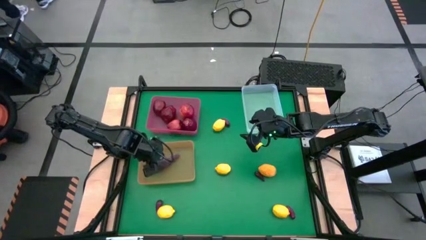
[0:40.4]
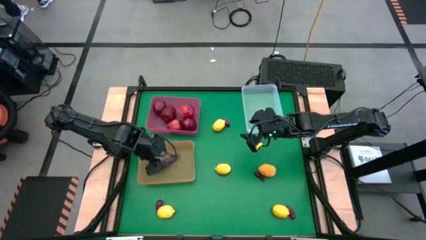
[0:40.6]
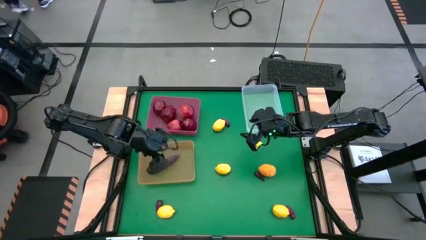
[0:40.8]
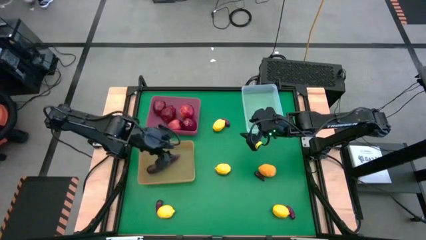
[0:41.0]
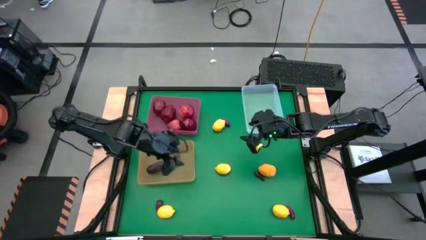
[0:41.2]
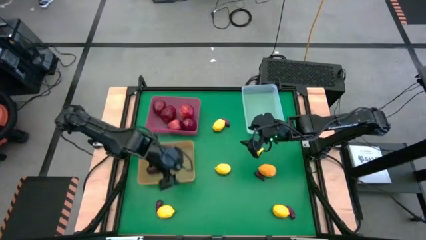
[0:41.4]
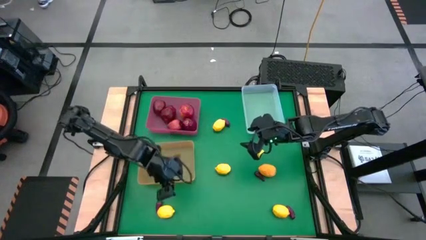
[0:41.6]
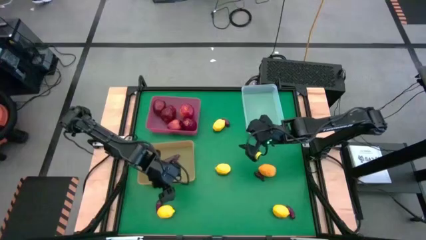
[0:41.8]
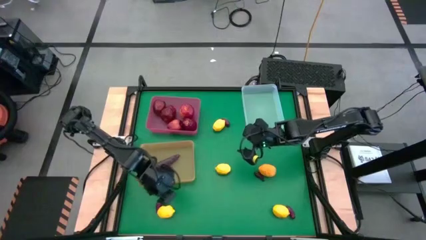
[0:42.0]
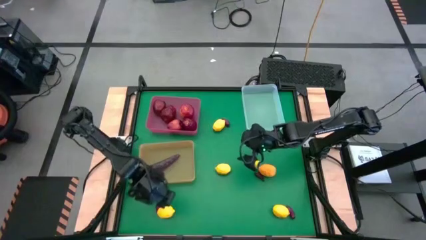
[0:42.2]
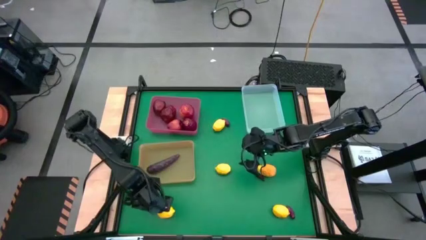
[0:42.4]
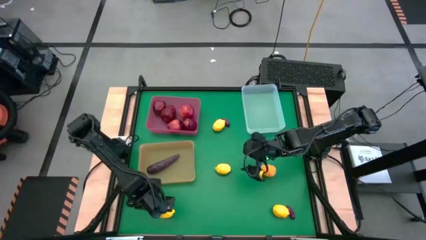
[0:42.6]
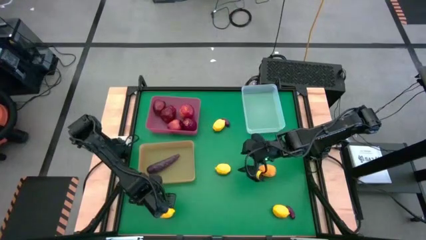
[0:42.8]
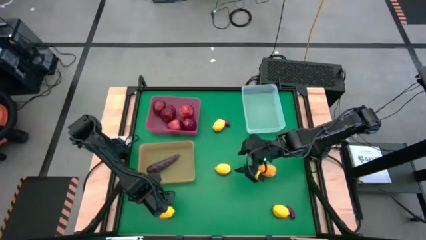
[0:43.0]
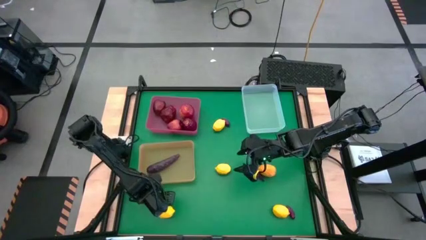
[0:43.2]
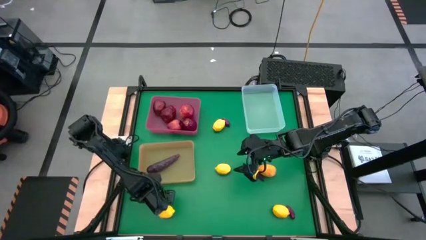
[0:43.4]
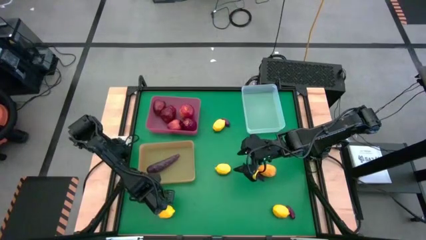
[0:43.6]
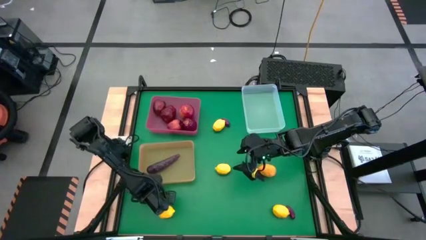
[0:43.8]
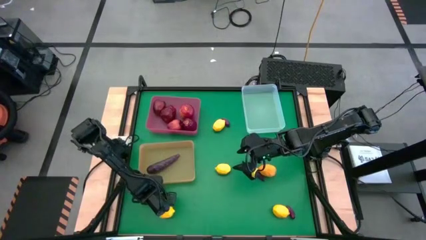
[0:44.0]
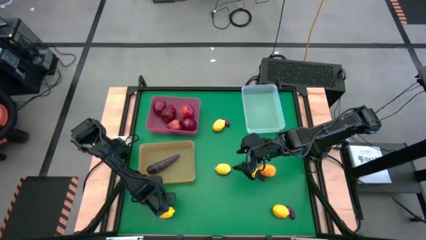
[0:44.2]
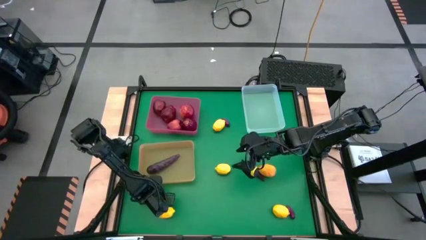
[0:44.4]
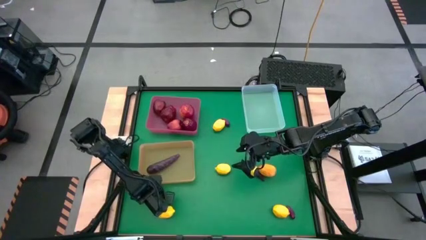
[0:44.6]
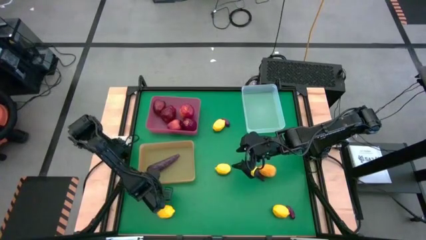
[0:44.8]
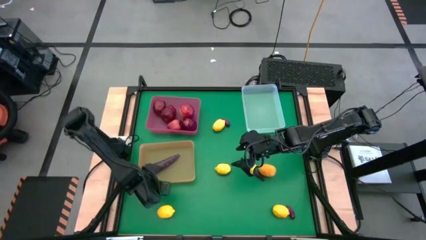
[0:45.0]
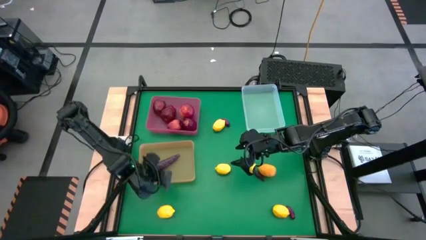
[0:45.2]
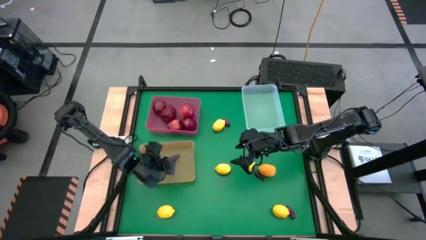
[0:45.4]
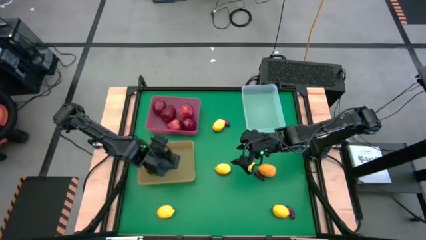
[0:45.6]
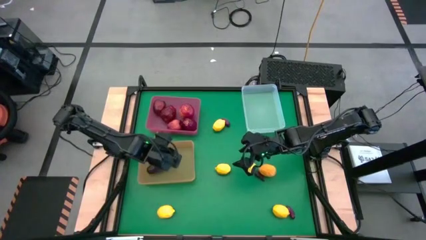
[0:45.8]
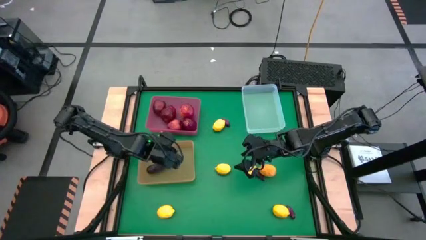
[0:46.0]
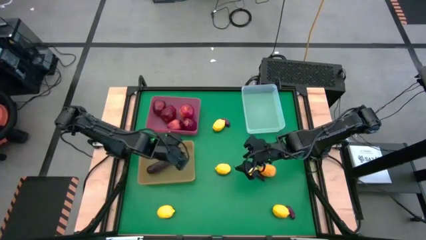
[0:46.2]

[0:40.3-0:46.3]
Task: Sort produce into baskets
Put the eggplant into the orange bin

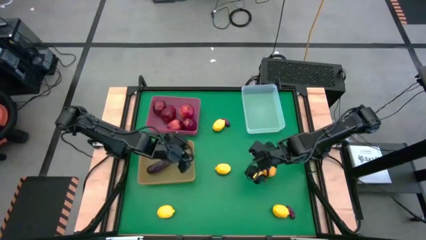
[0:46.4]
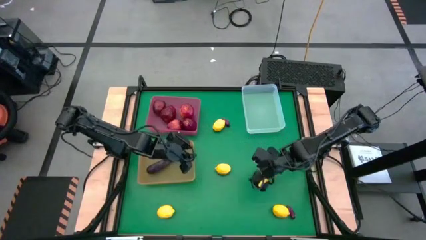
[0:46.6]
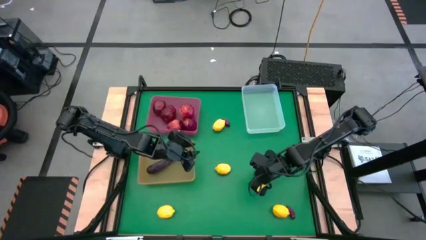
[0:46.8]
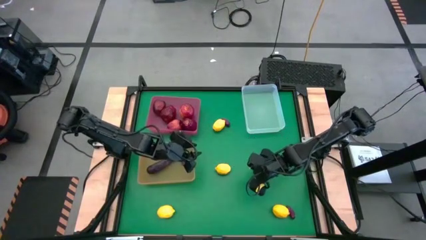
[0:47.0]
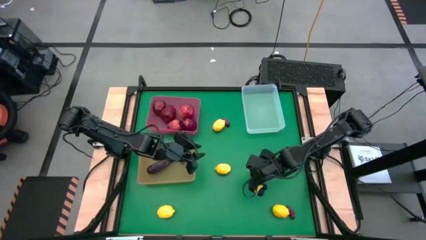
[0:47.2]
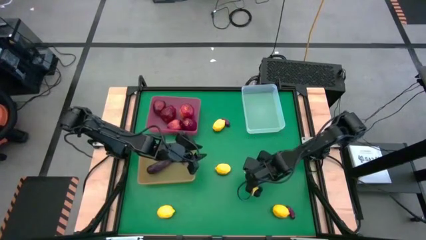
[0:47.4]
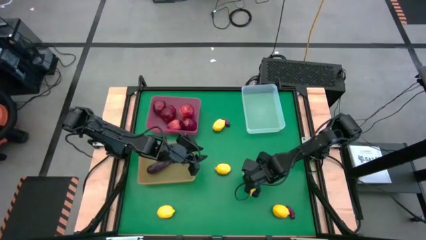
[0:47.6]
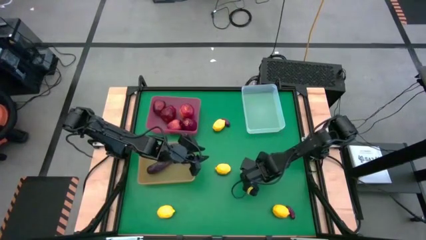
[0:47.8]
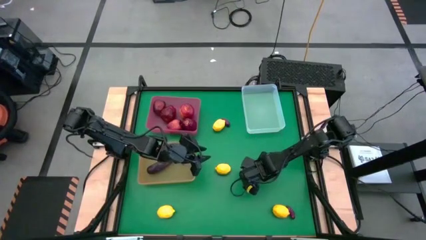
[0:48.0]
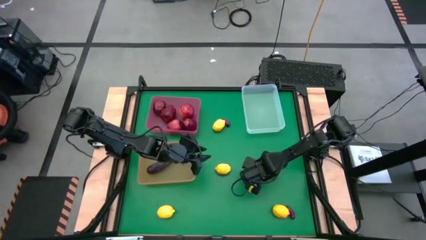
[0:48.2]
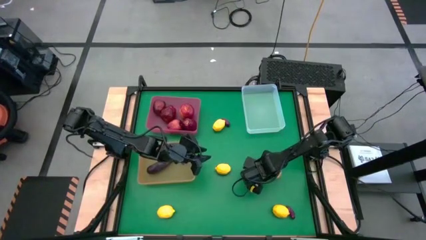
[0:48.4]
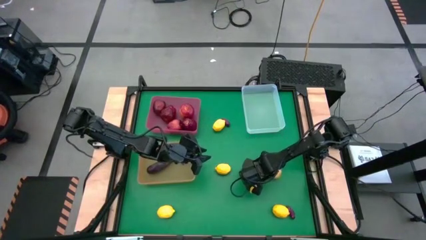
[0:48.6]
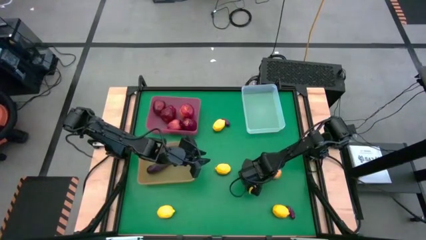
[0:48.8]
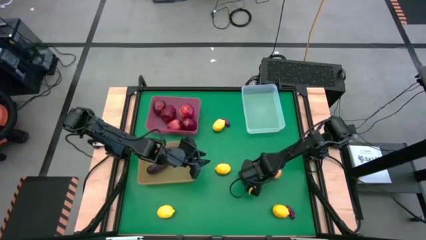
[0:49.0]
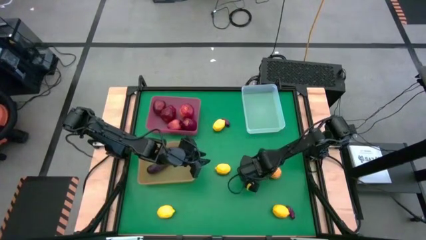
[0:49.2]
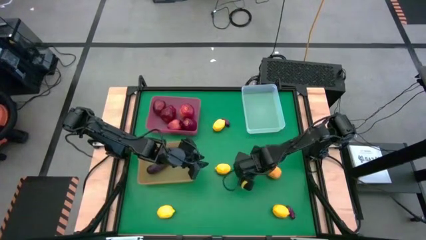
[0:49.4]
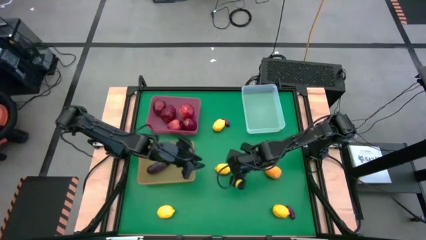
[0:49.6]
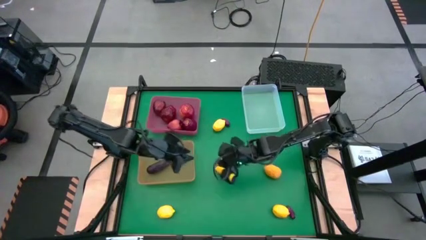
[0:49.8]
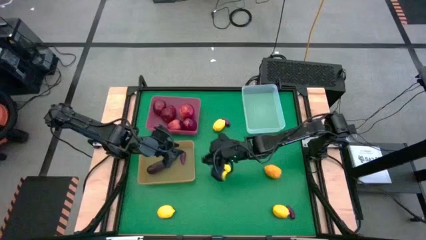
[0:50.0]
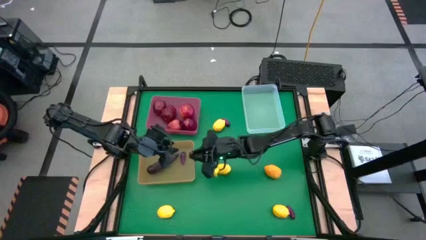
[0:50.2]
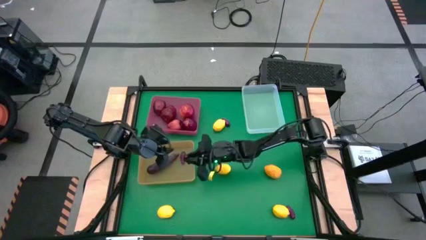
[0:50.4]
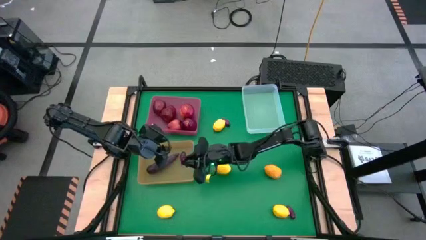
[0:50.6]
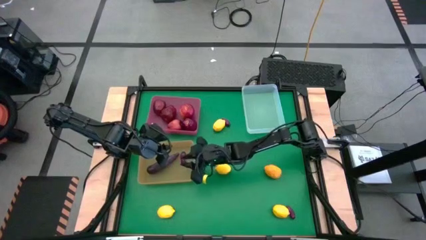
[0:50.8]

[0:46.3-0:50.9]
Put the eggplant into the orange bin

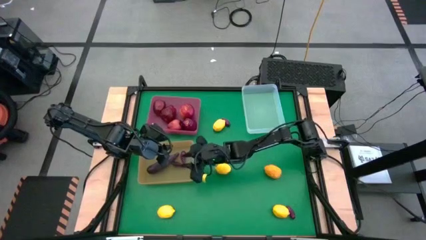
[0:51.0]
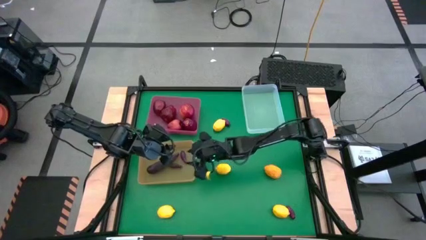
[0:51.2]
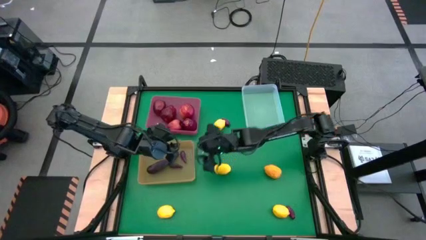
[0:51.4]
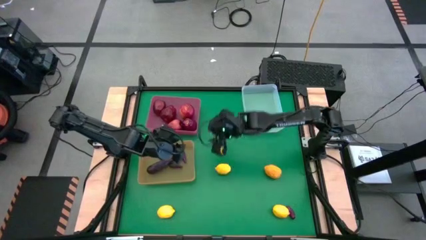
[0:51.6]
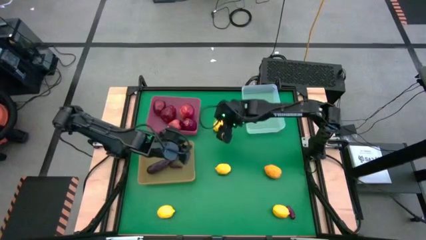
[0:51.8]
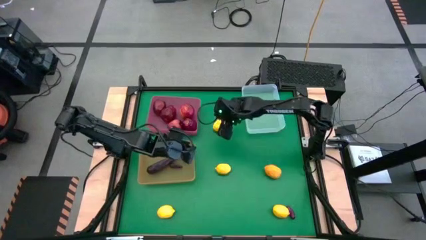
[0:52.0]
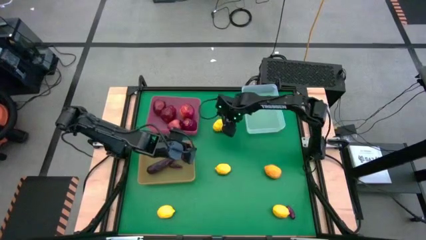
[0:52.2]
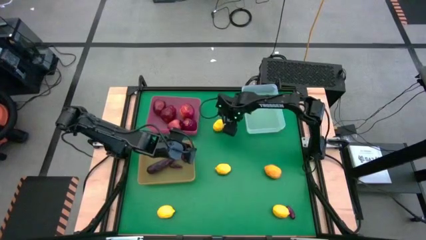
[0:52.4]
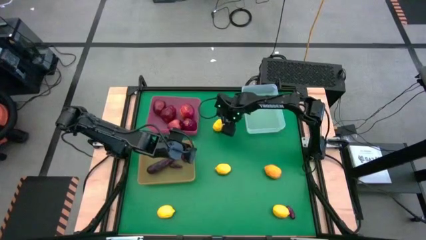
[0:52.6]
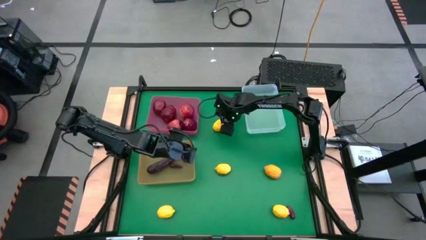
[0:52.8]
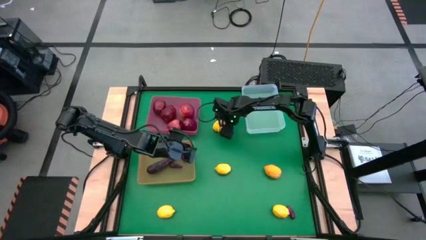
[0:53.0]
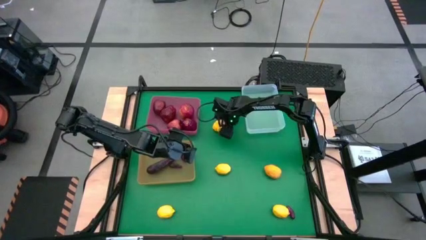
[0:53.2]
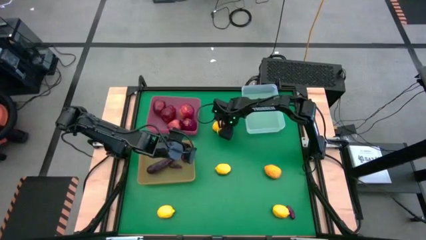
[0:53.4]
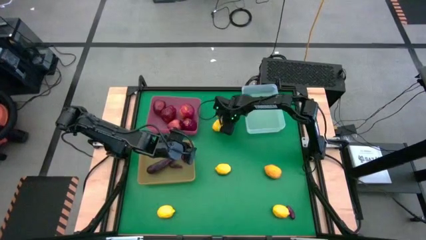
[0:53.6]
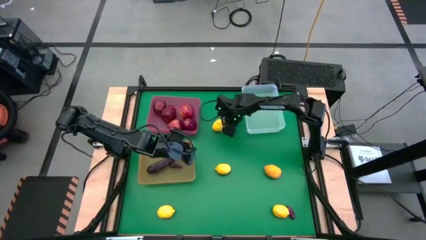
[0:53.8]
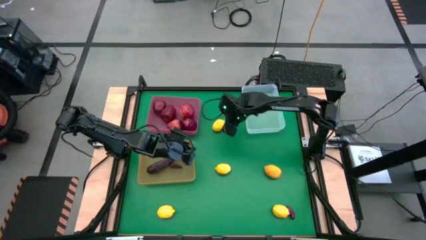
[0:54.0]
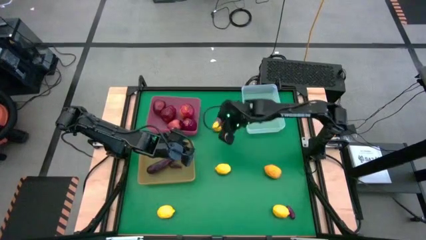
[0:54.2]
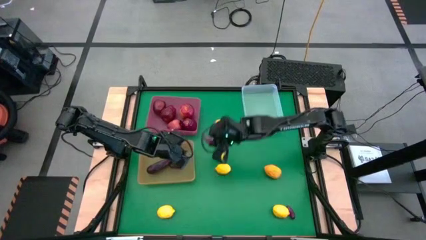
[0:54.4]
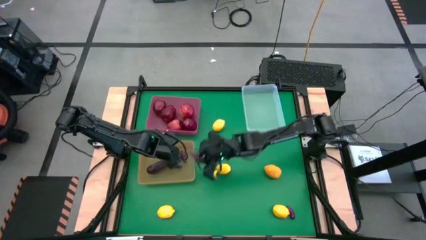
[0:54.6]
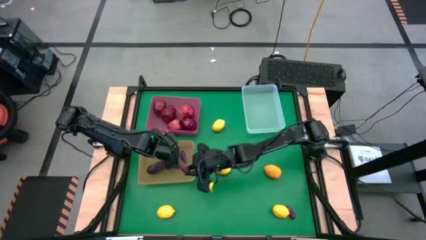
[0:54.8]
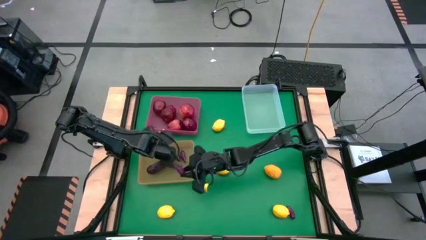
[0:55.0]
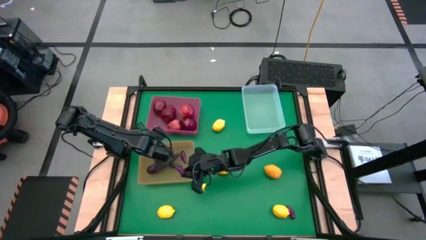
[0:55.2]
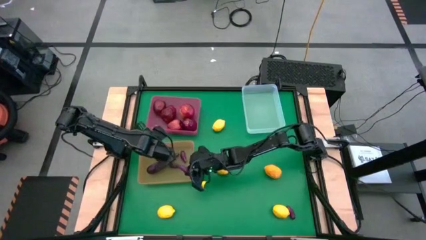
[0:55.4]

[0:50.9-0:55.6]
Put the eggplant into the orange bin

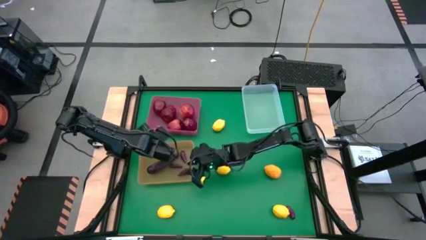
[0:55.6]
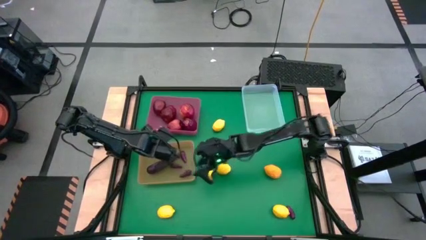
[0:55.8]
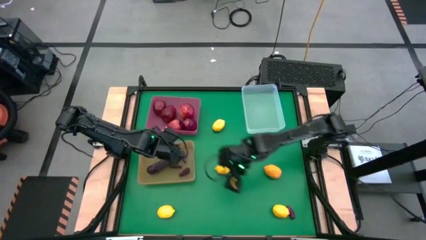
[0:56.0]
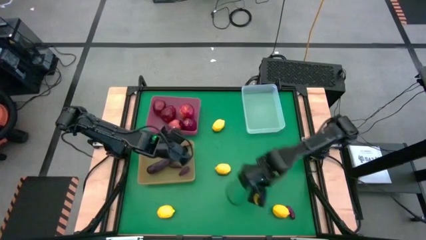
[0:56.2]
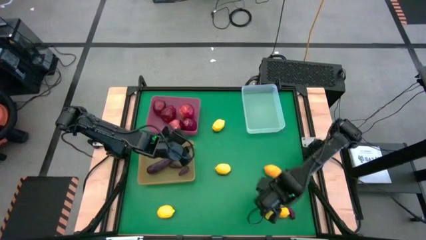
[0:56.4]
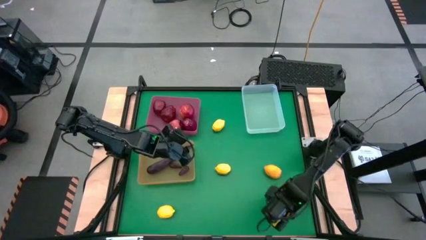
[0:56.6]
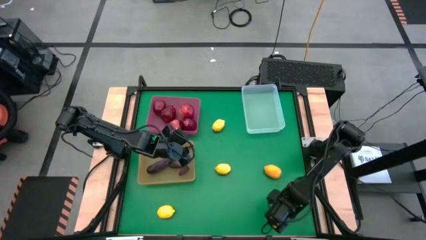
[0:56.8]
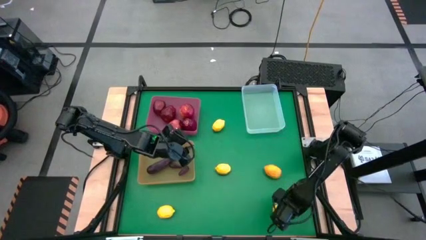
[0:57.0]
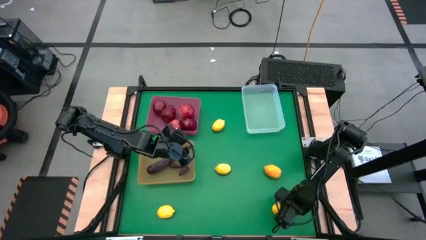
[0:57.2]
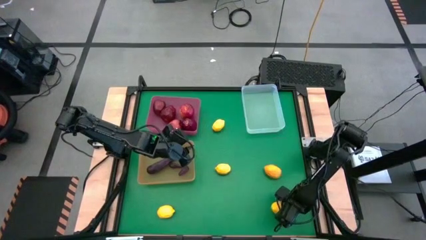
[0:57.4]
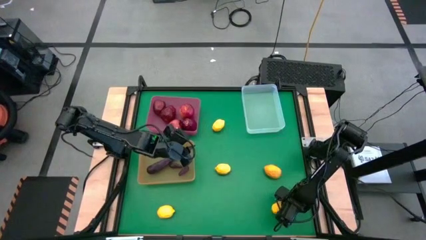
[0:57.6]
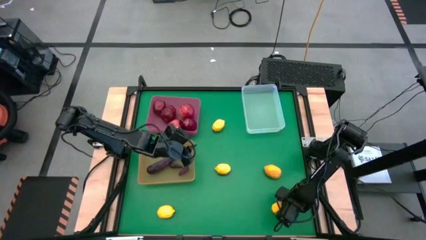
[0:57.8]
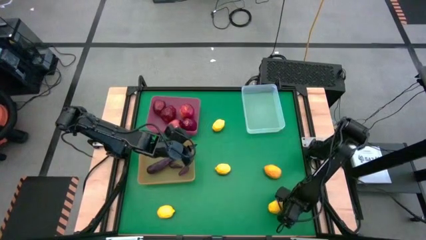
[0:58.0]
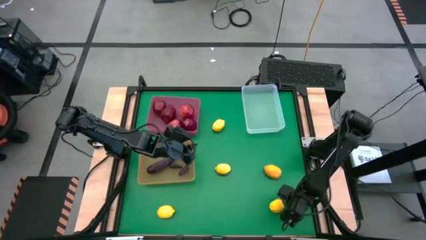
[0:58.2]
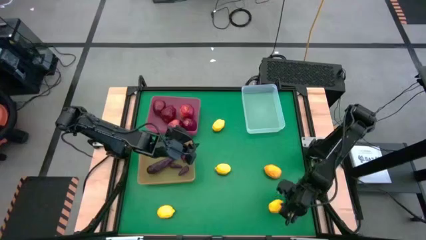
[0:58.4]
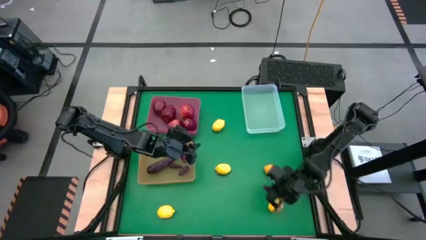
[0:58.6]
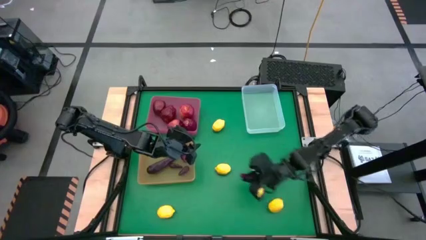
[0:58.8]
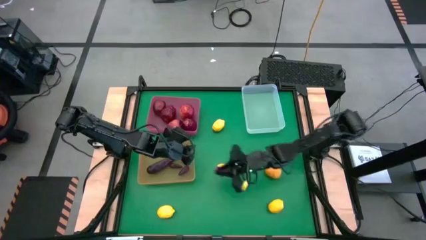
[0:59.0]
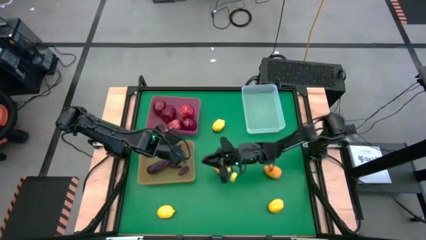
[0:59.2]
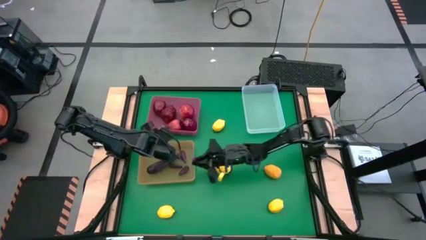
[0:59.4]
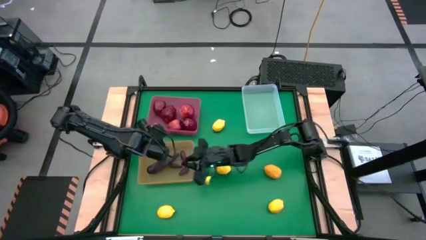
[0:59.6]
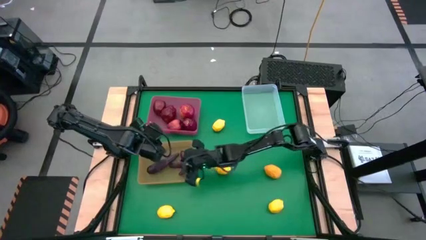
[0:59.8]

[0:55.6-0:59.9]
Put the eggplant into the orange bin
